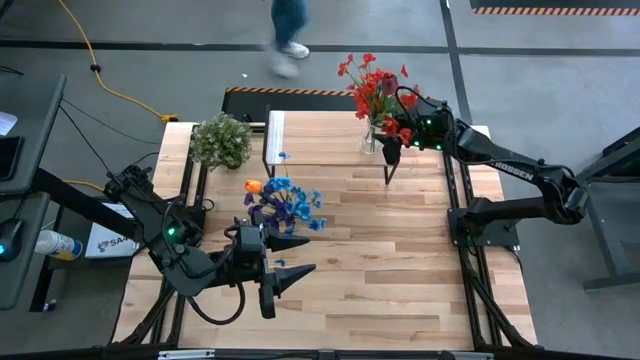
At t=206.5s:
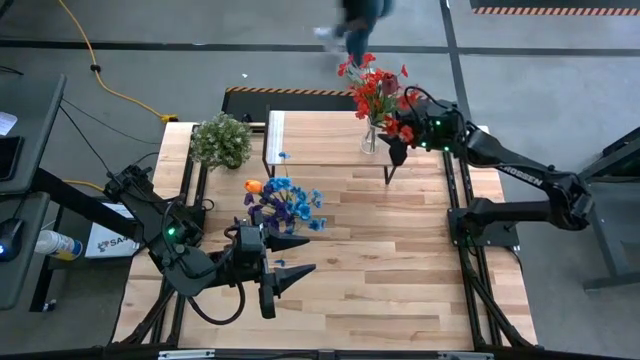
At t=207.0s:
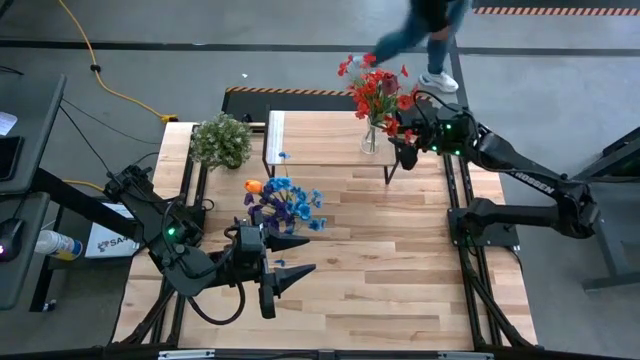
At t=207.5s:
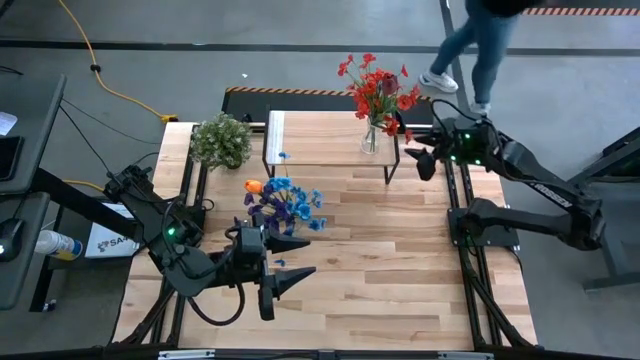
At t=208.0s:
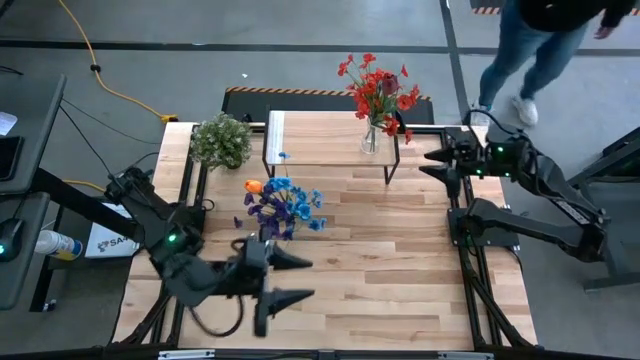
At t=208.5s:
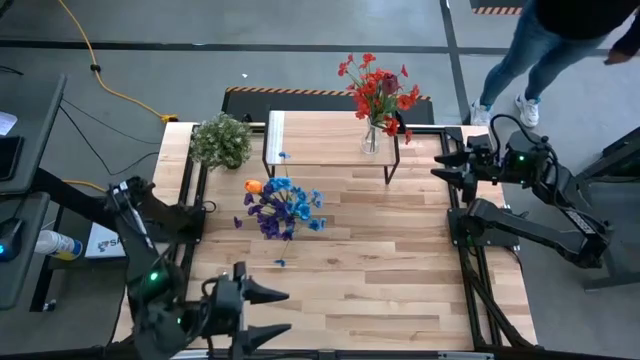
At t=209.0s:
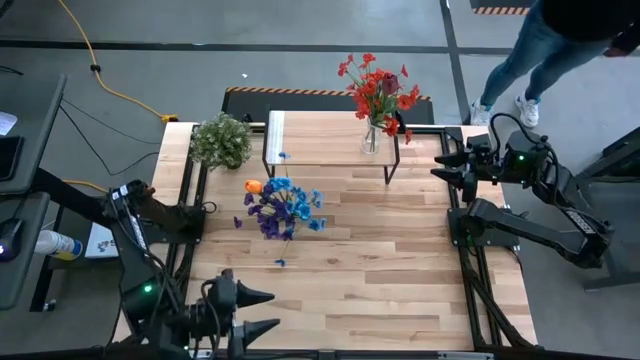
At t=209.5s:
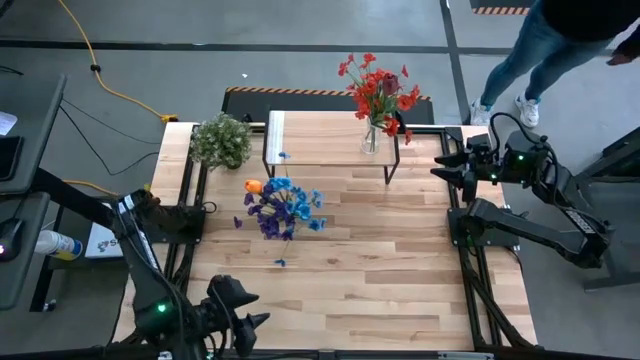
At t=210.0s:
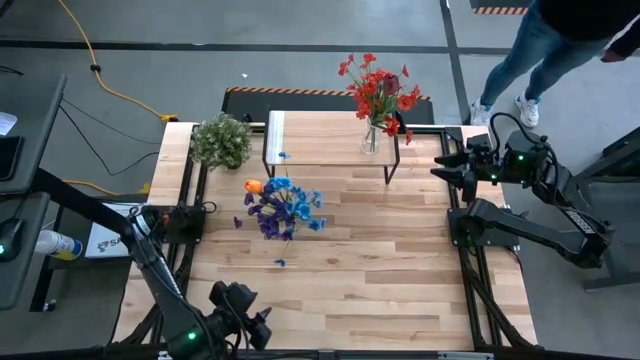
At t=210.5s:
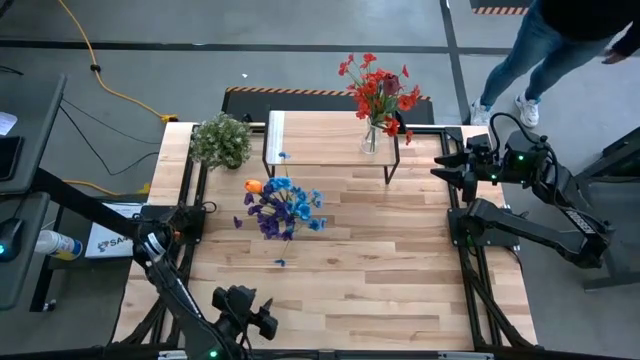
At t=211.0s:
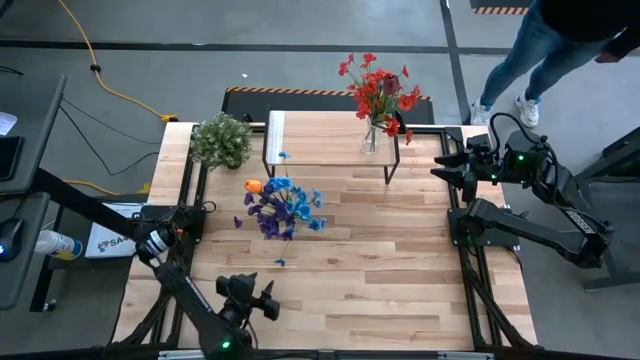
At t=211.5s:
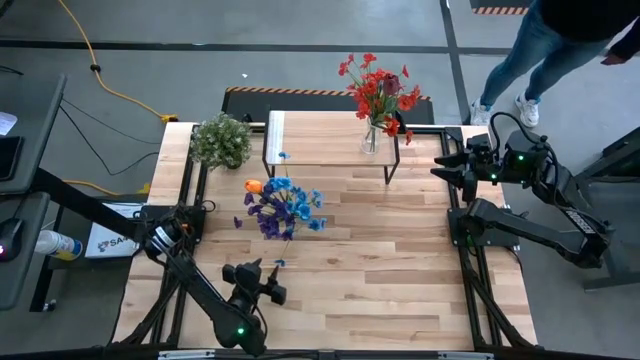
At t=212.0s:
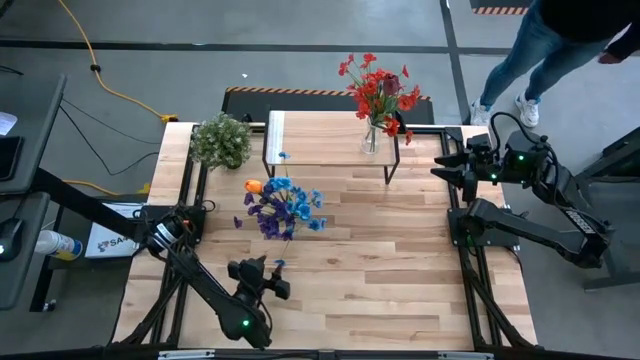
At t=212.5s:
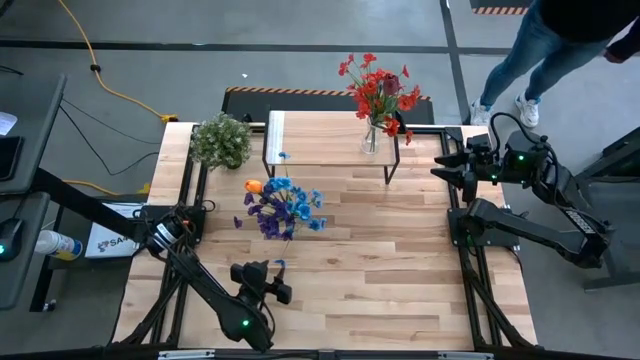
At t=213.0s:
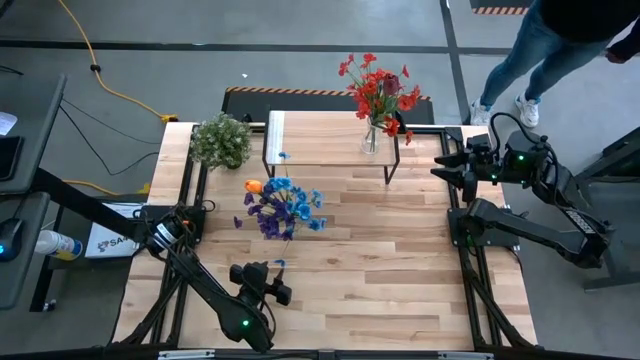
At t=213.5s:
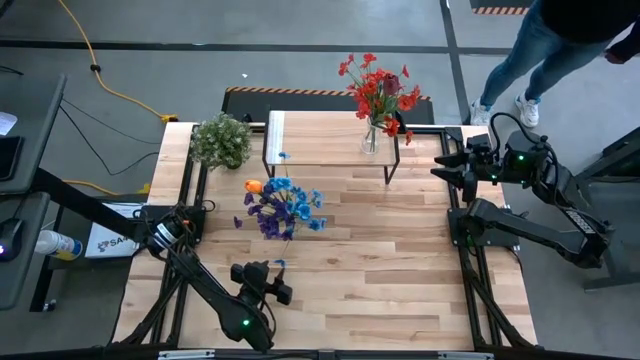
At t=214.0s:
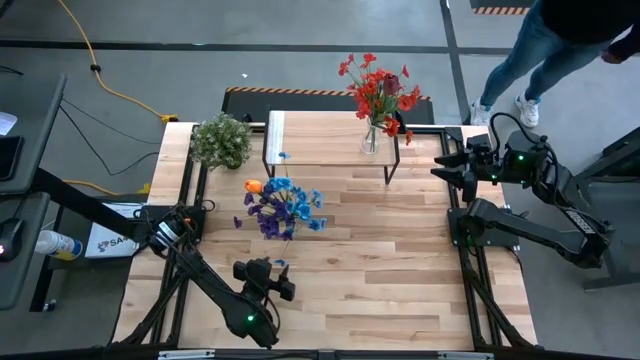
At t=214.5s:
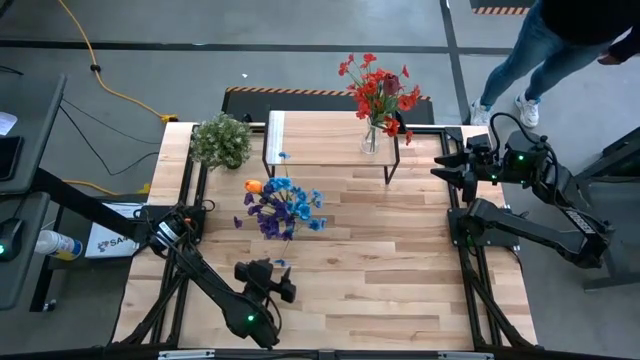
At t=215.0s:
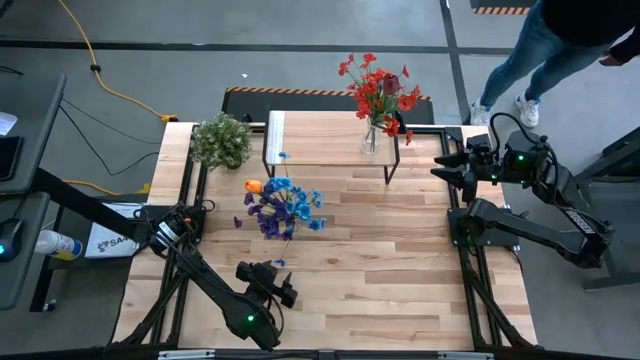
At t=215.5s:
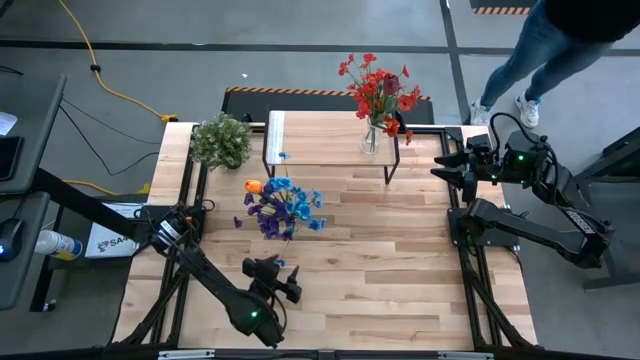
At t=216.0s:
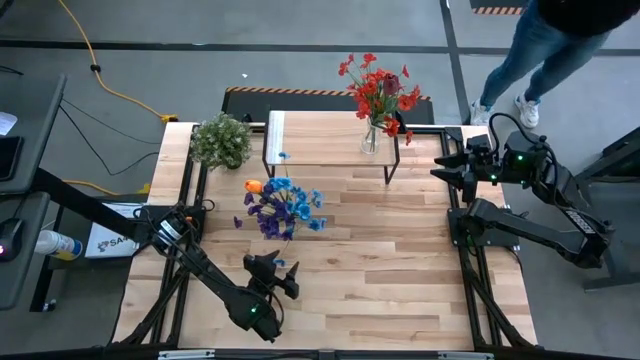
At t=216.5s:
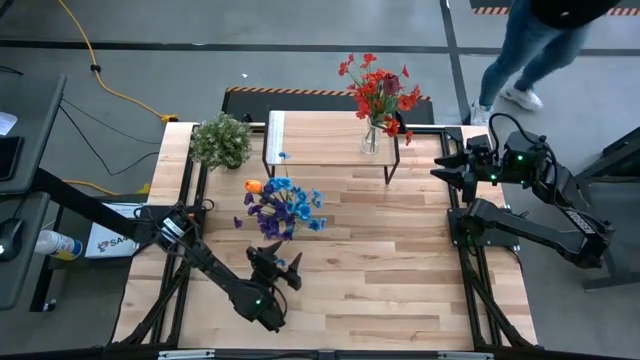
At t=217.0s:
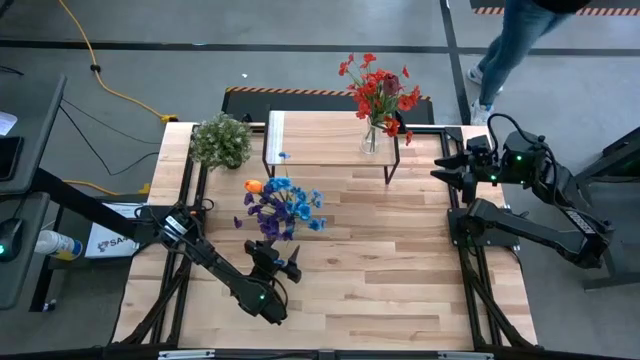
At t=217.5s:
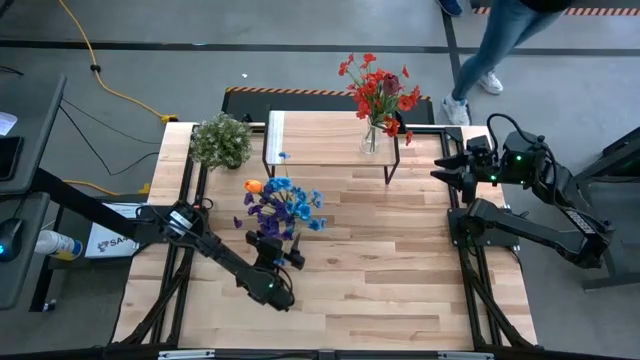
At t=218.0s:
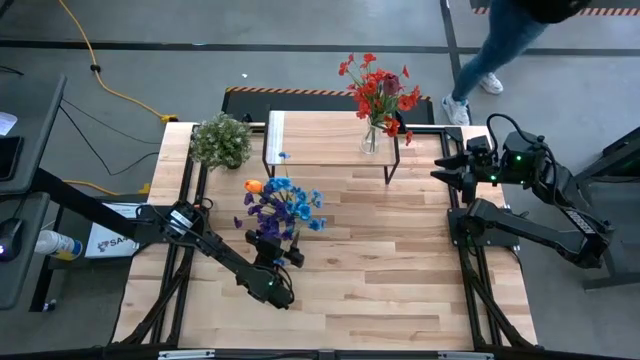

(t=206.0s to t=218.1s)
Task: Pick and place flowers into a vace then onto a shelf
Put the transparent vase on the shelf

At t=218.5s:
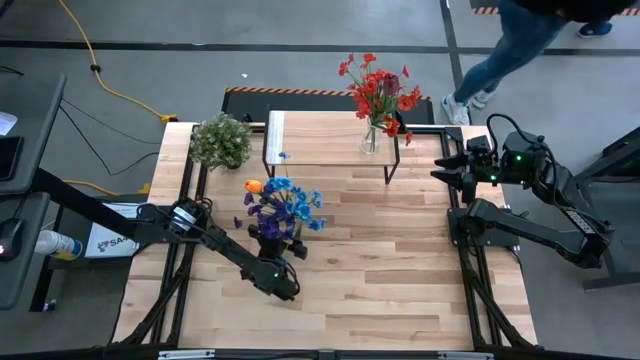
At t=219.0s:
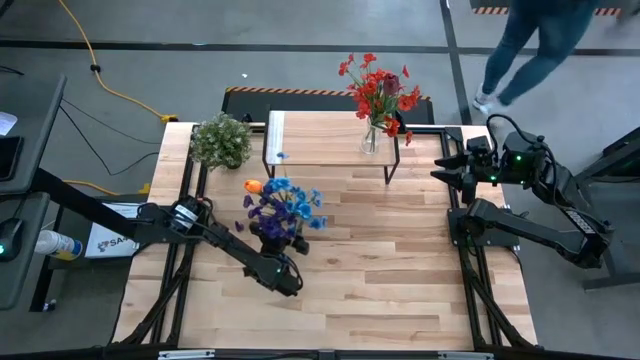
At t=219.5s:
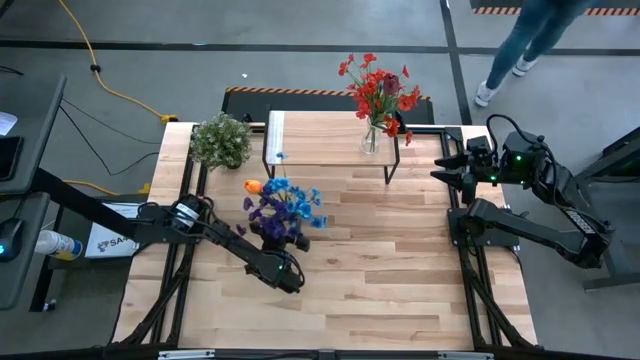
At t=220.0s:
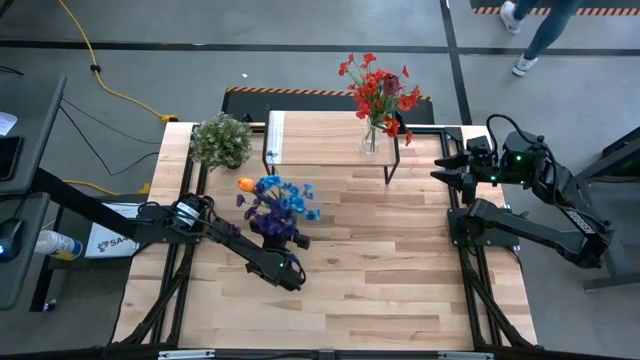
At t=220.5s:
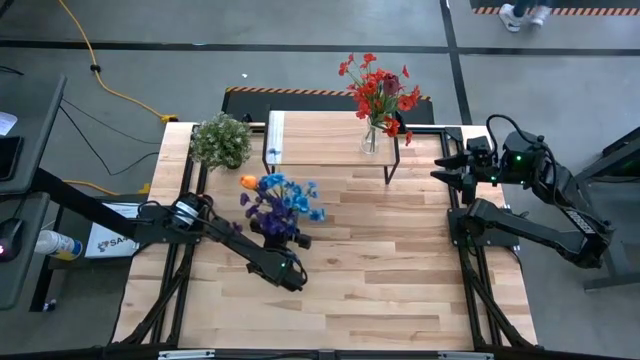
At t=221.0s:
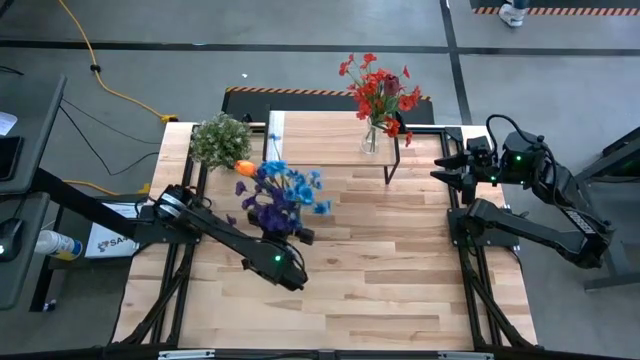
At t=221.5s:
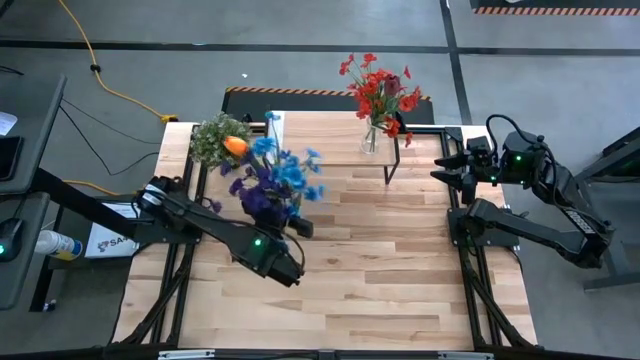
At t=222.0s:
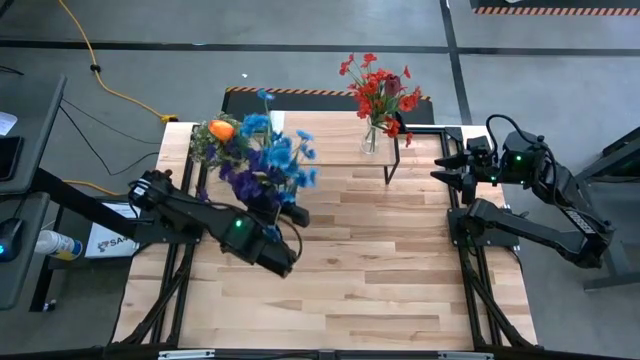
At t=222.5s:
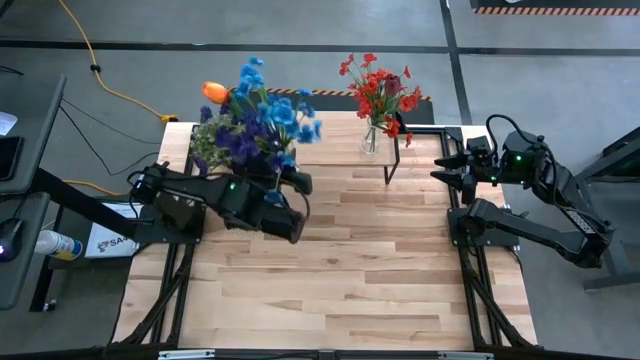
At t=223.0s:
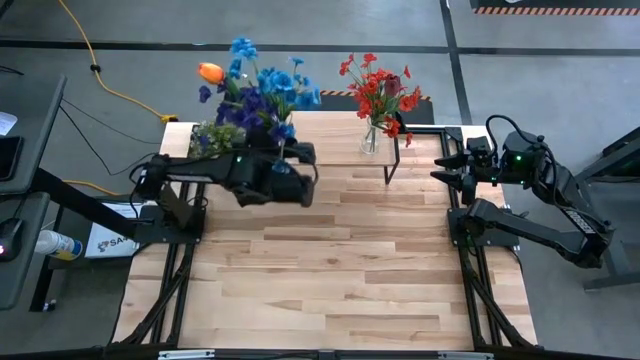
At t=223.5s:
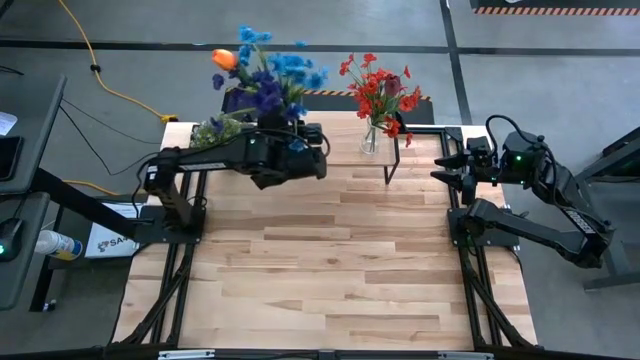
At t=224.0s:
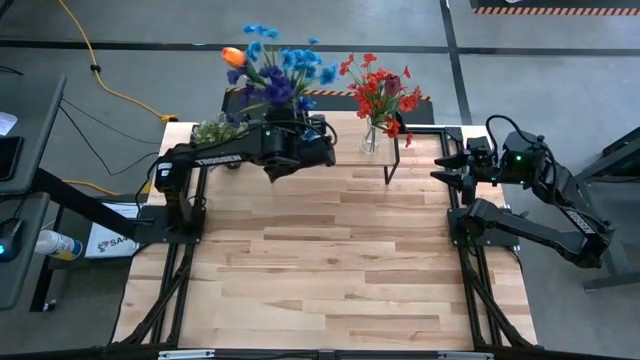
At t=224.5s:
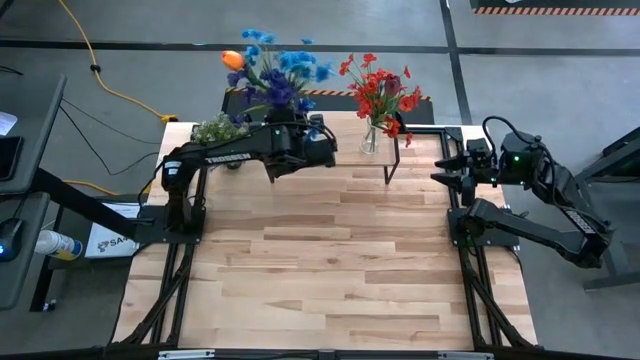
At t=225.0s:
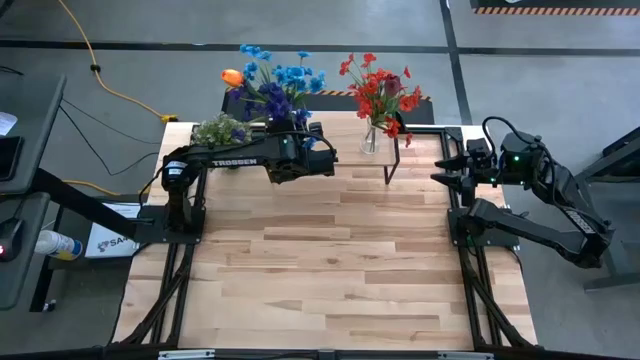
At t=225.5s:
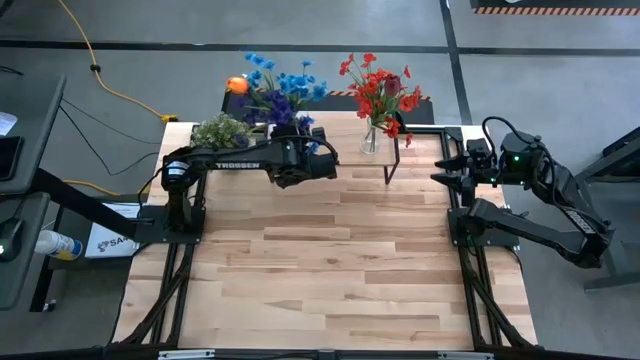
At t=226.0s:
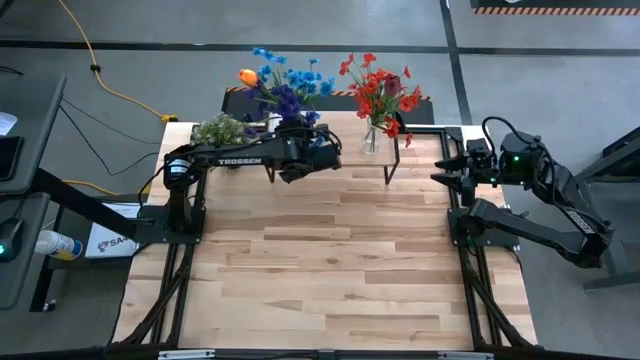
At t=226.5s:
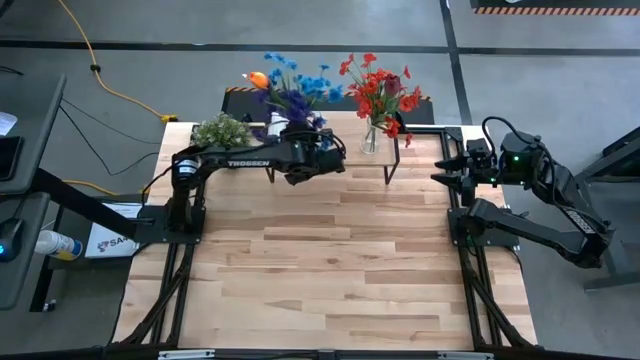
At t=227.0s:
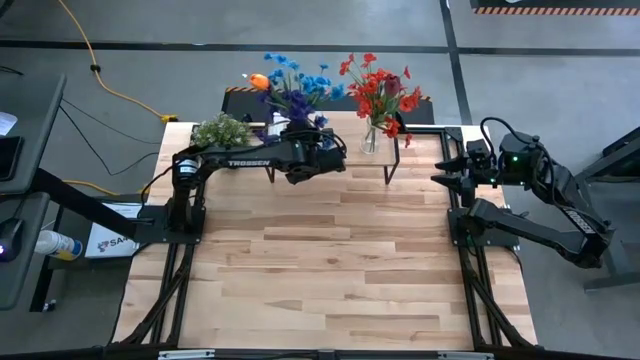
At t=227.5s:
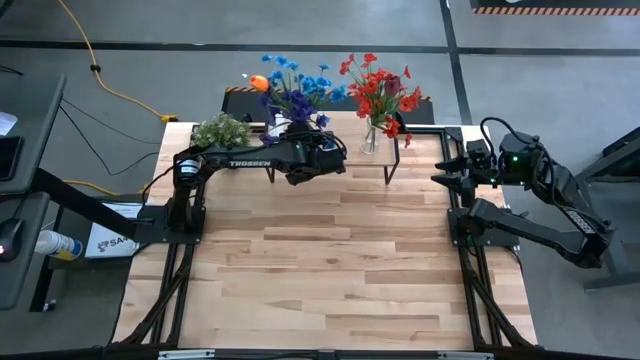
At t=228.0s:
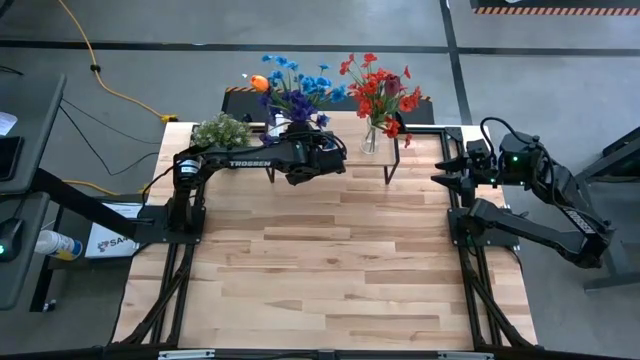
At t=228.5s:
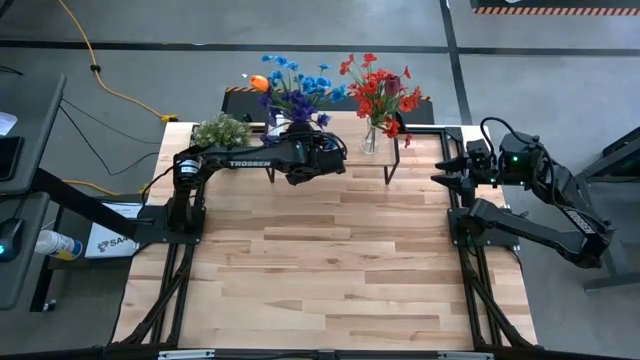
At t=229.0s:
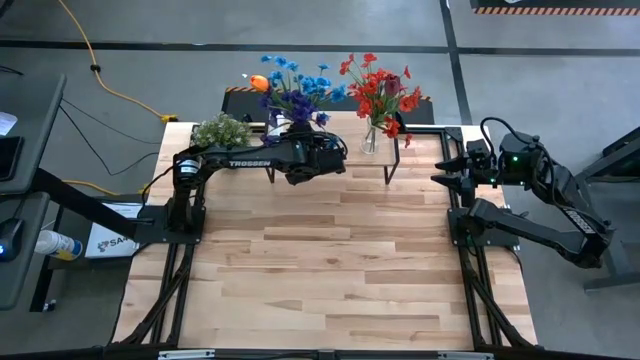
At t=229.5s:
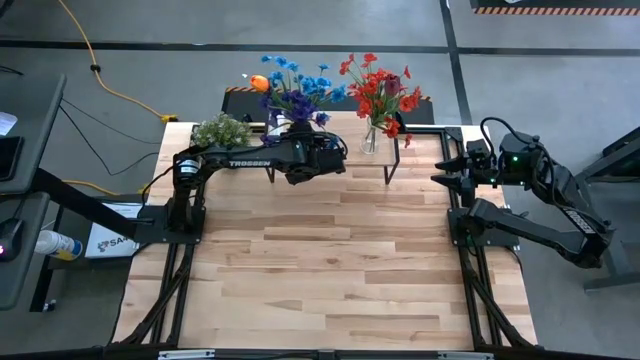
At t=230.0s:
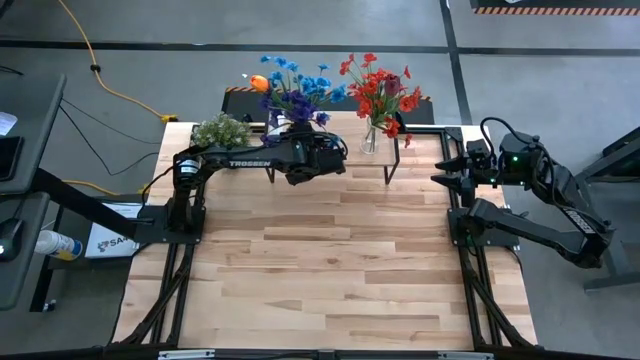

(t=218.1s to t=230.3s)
Put the transparent vase on the shelf
